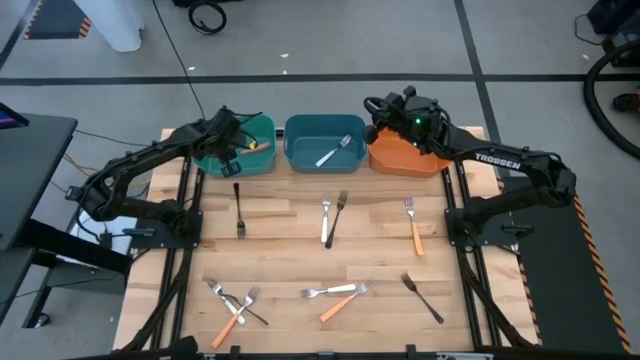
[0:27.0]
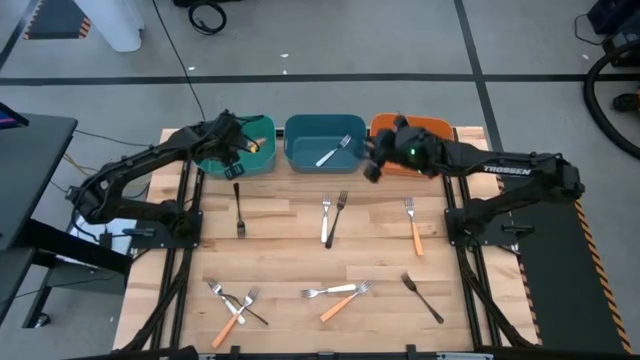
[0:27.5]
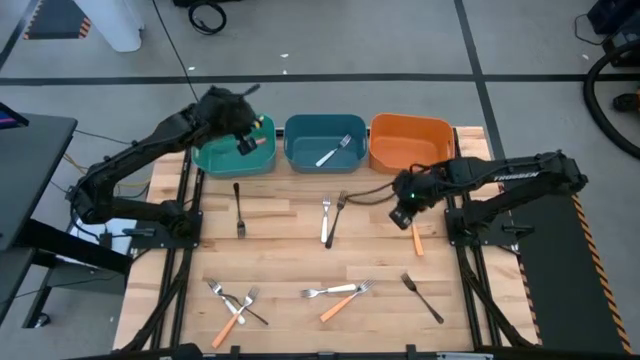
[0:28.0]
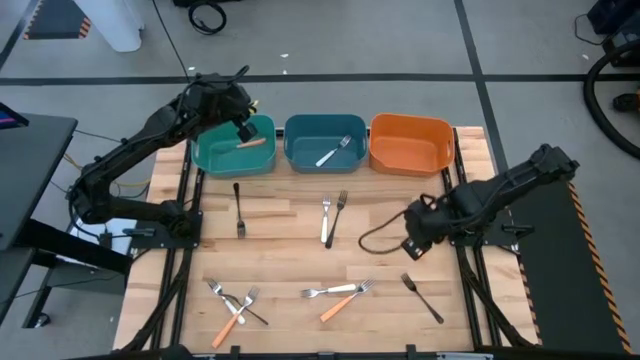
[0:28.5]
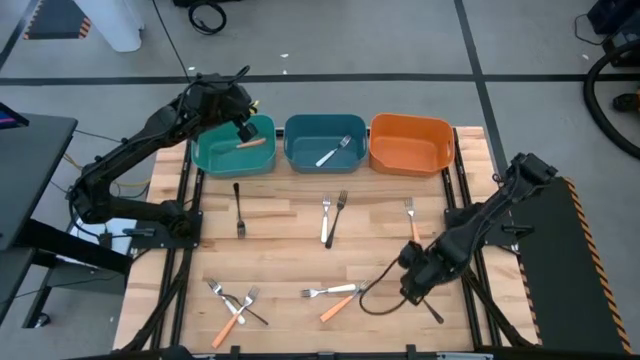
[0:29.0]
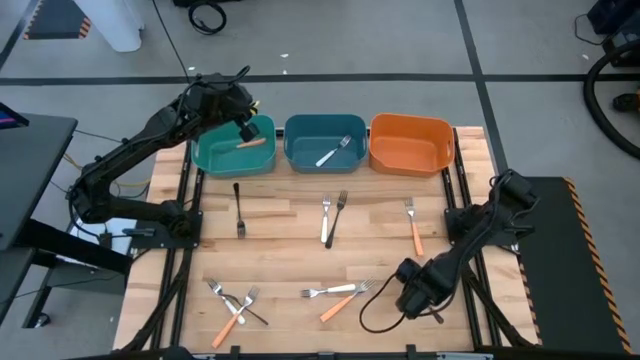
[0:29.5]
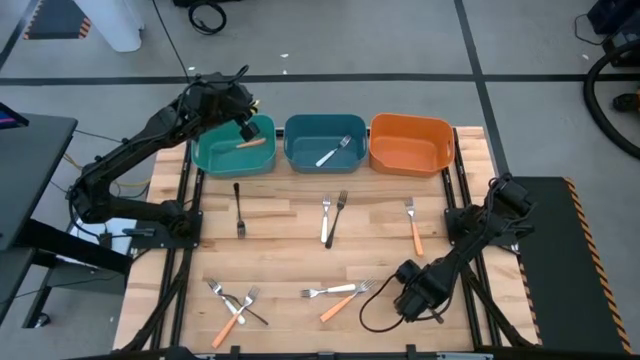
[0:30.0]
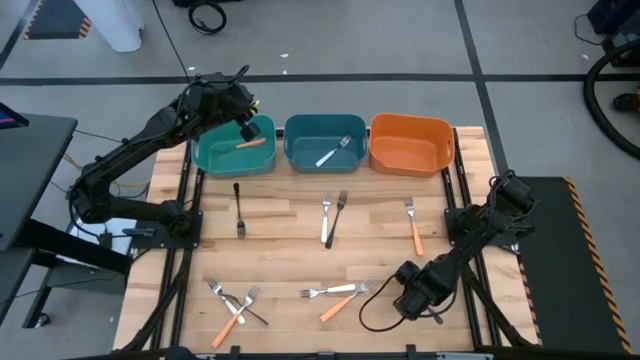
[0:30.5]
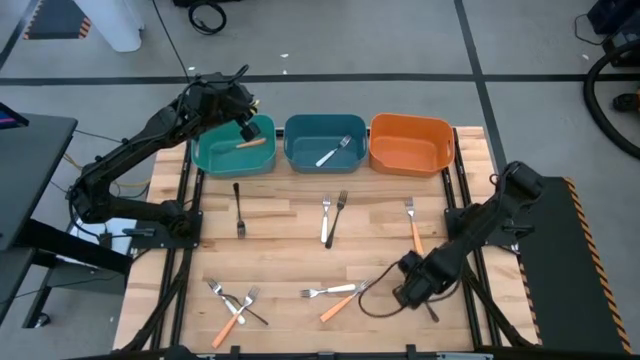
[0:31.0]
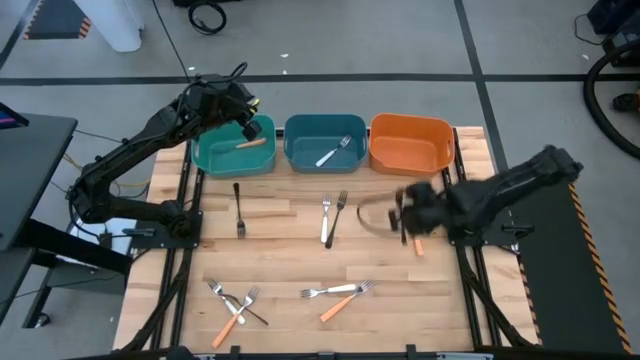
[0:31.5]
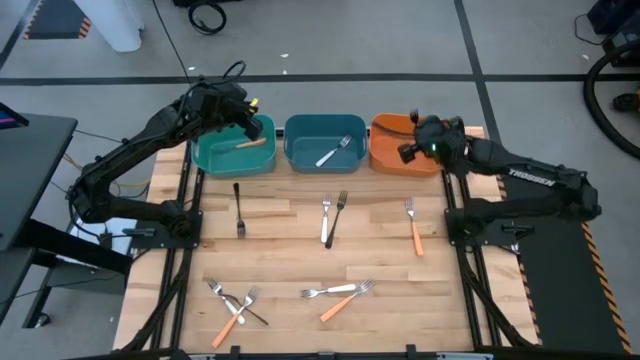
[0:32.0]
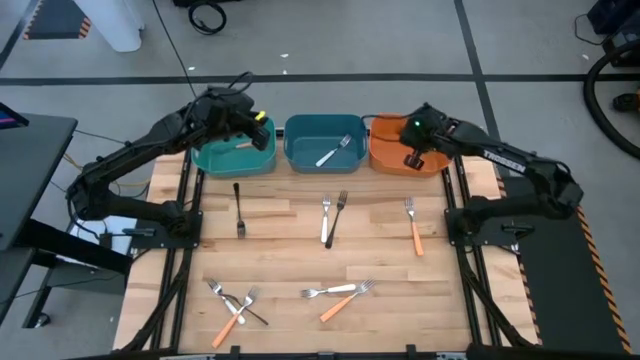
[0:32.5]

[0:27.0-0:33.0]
Task: Sort silverware by color (type)
Put the black fork into the orange bin

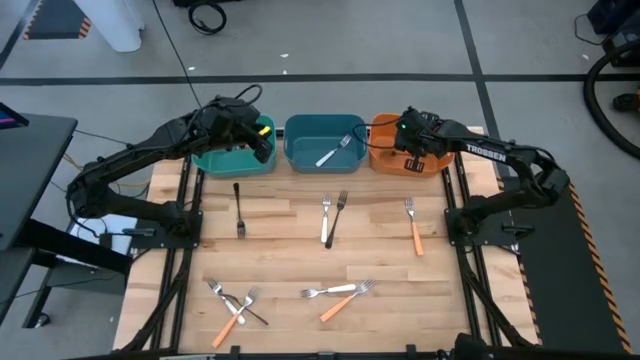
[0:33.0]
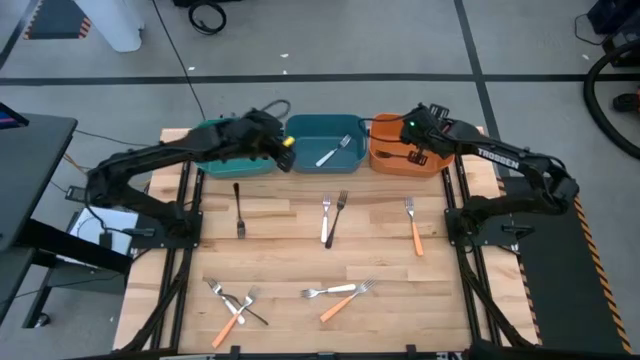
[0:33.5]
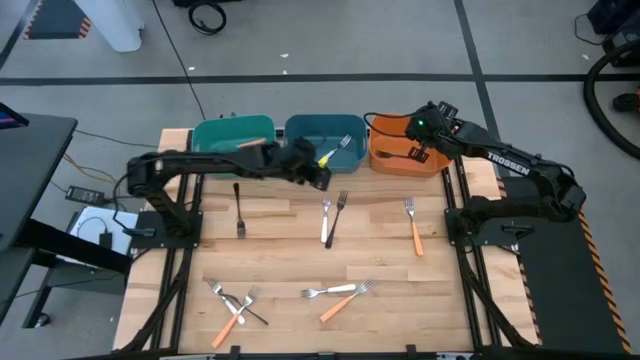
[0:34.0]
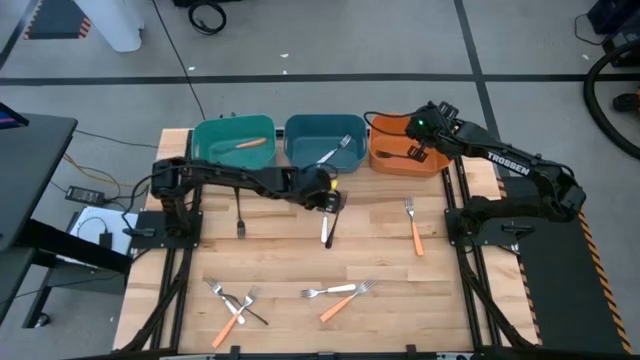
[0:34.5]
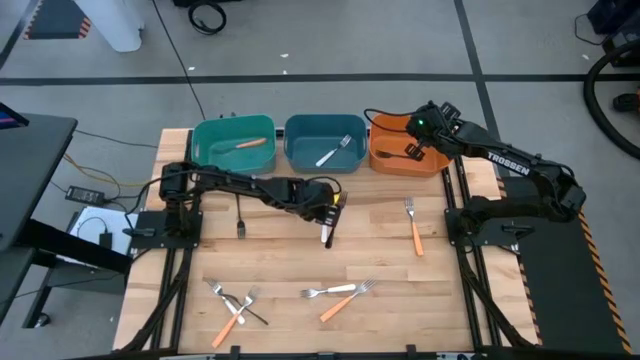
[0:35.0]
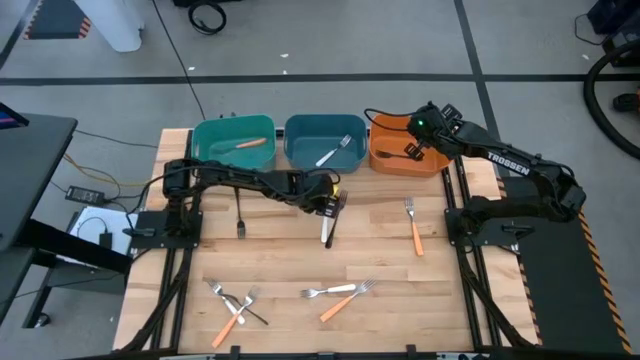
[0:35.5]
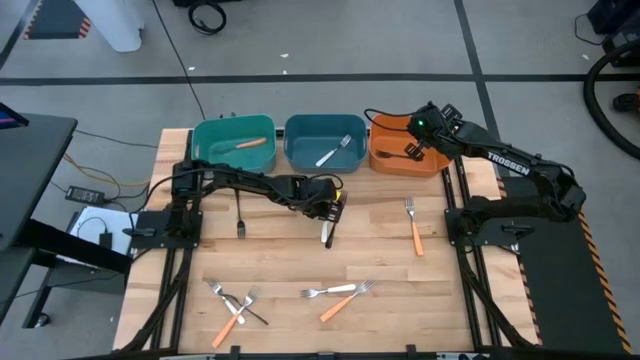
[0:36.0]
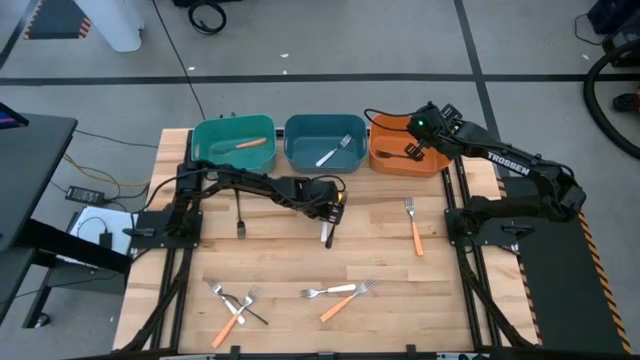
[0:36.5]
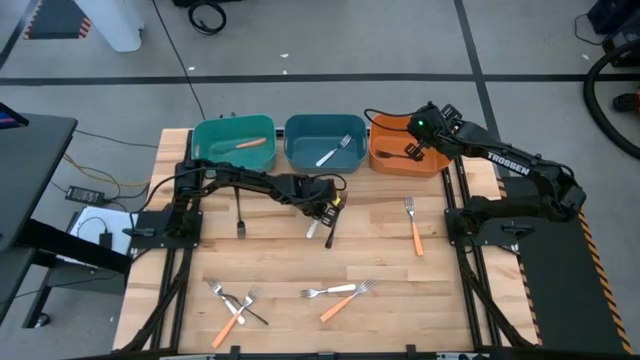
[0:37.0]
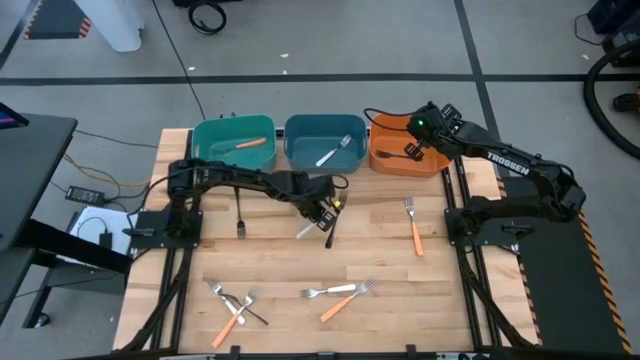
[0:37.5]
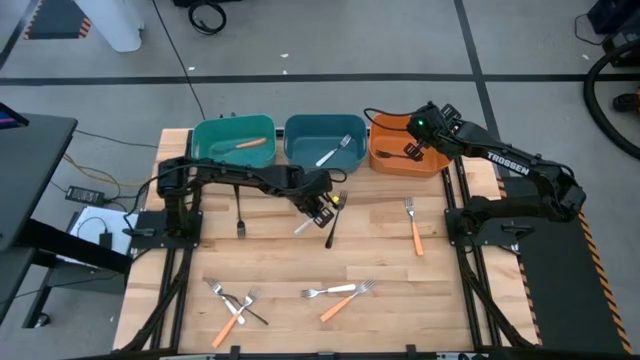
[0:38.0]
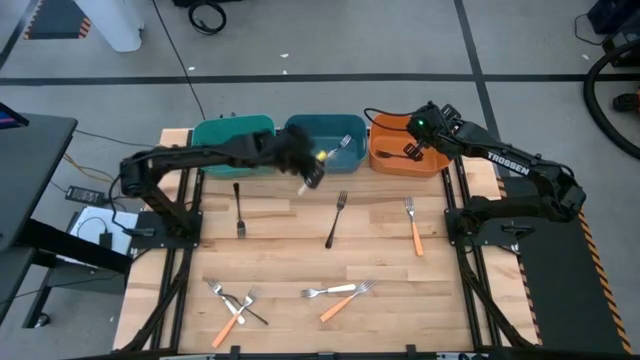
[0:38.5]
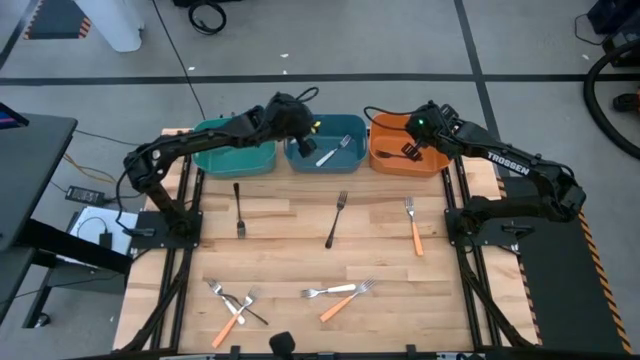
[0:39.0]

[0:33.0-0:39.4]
Put the white fork into the dark blue bin

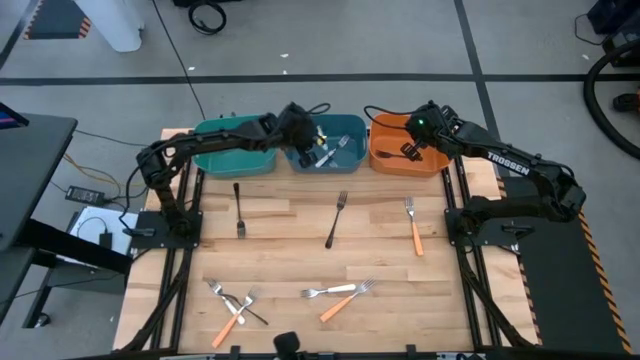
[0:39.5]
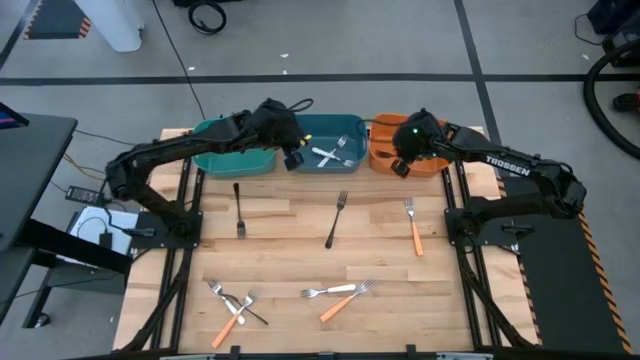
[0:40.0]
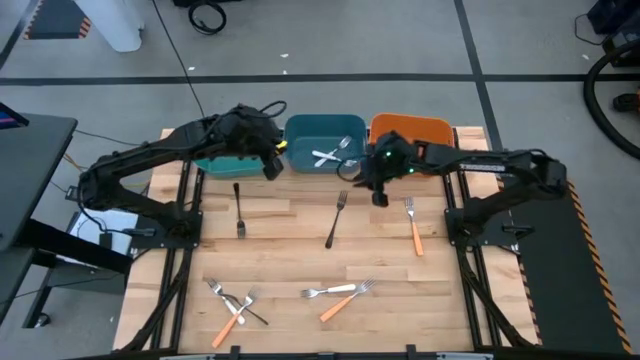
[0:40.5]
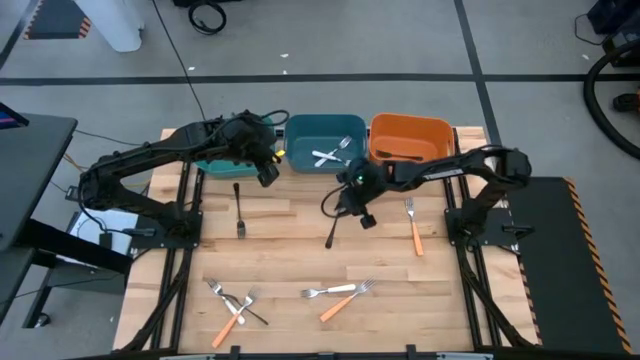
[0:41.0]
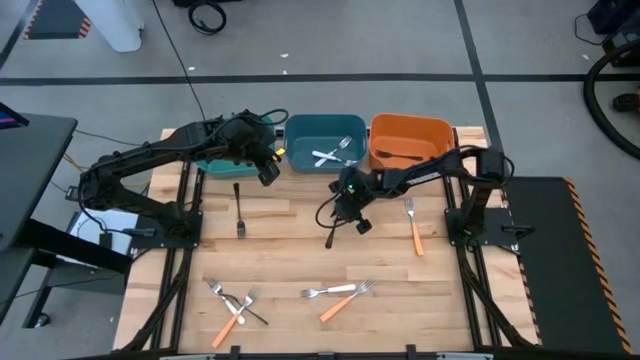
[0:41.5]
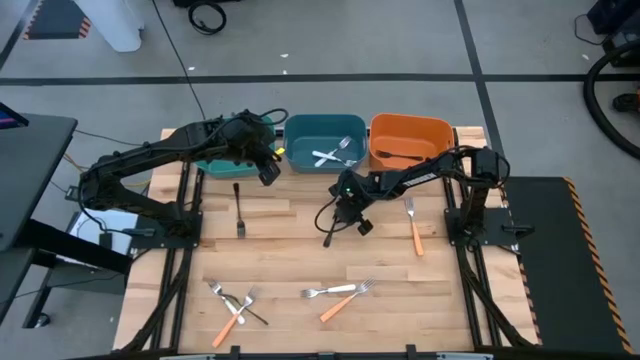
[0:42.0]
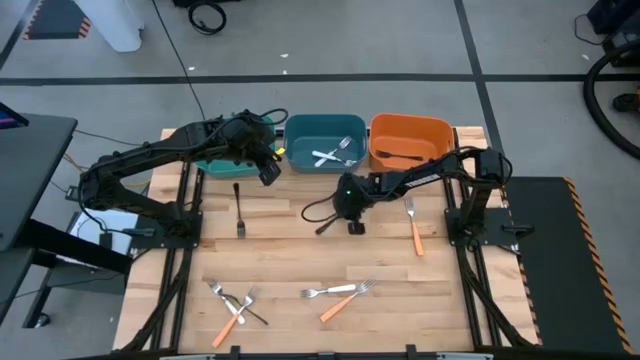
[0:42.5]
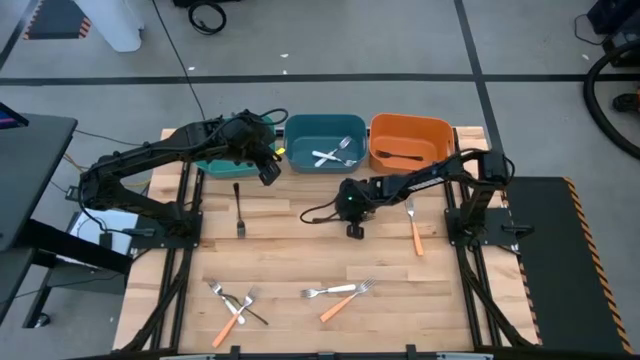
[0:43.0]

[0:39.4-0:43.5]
Put the black fork into the orange bin

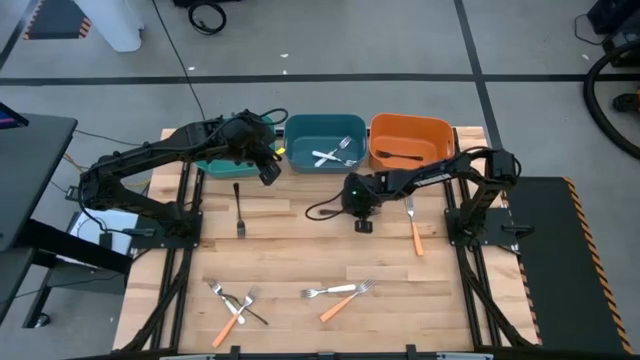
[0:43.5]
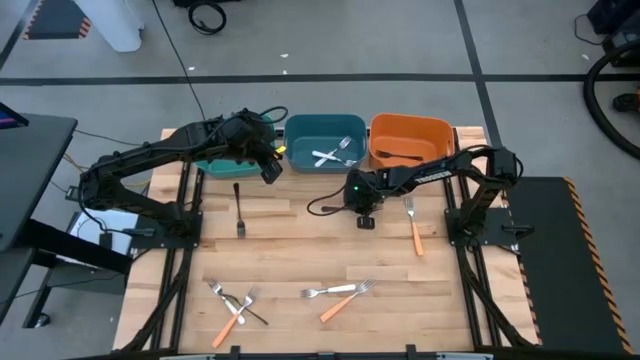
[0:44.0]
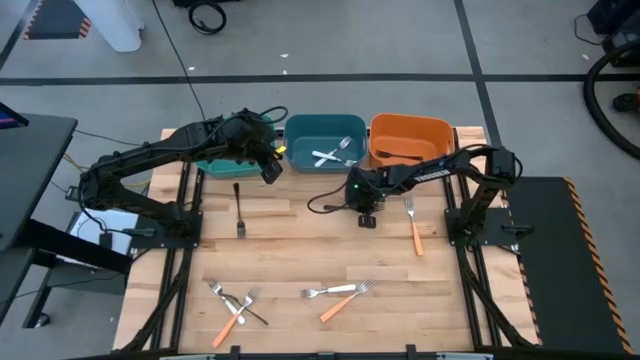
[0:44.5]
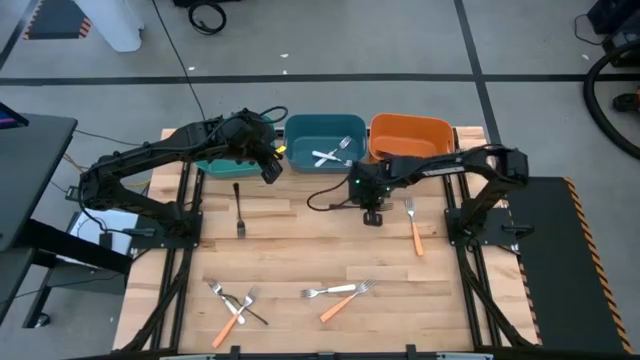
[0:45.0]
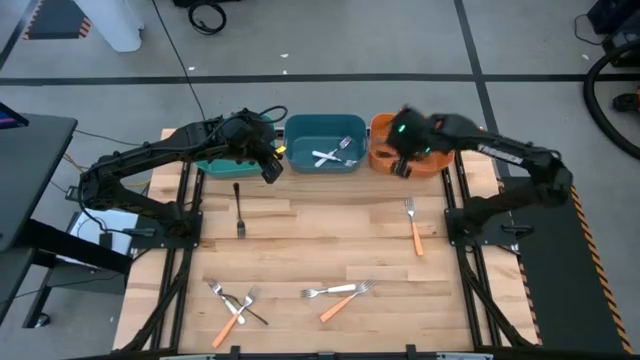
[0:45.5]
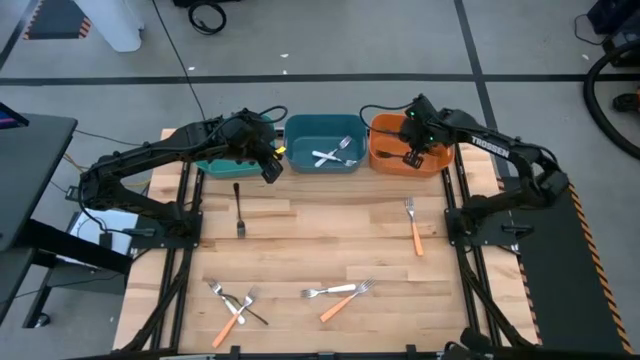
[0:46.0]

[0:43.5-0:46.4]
Put the black fork into the orange bin

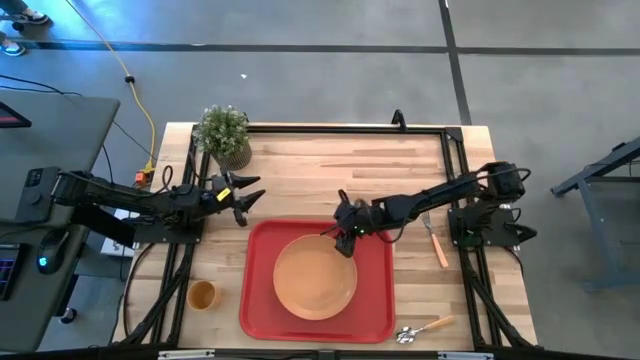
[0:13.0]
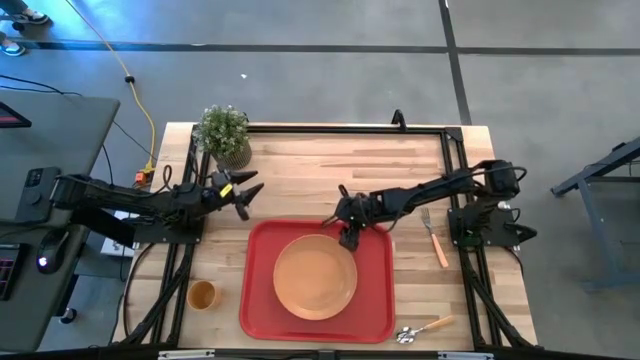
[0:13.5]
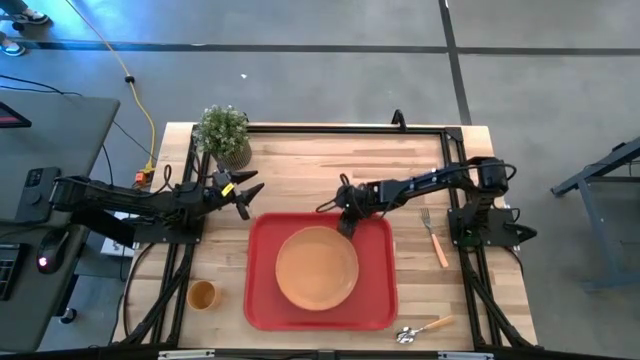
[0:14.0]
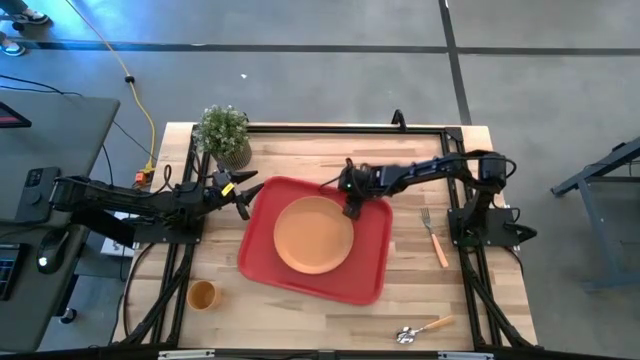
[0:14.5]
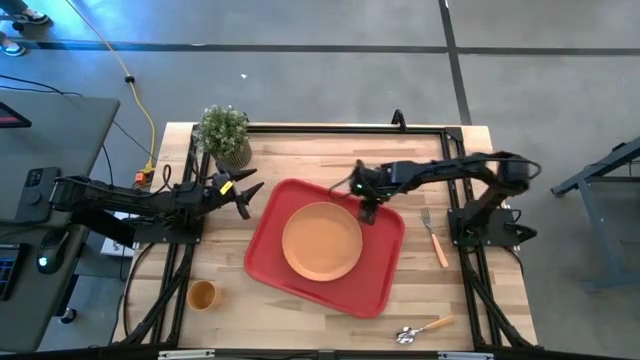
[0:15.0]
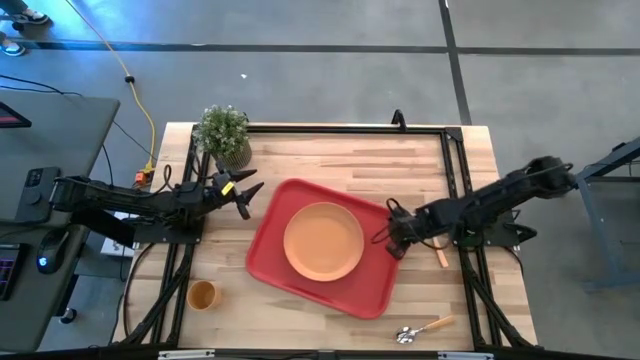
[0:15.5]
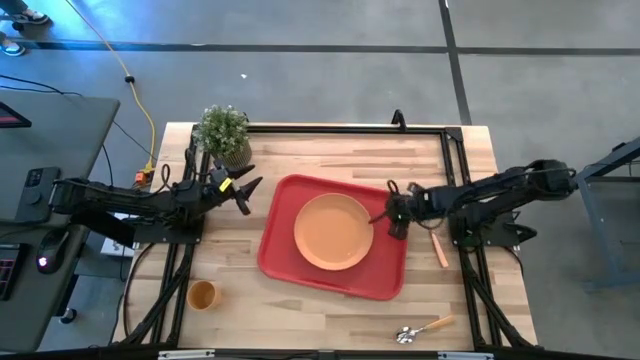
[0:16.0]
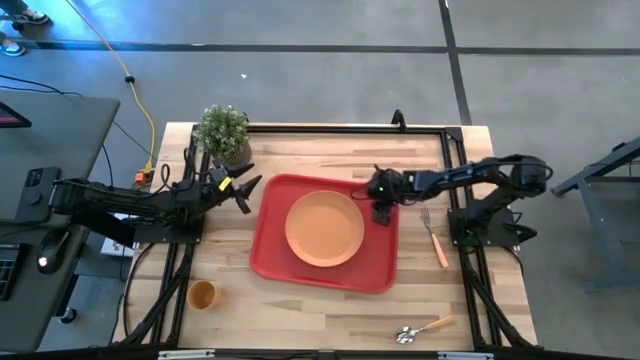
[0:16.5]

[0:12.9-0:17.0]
Task: Pick and place plate/cup/fork/spoon on tray
Adjust the red table tray
